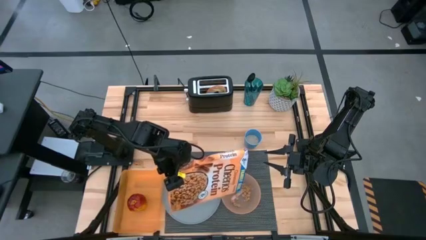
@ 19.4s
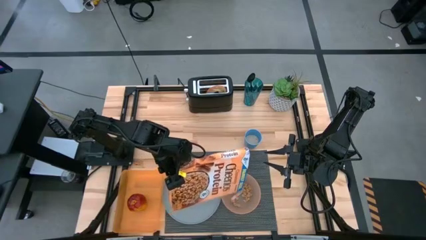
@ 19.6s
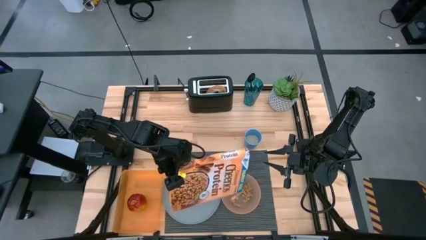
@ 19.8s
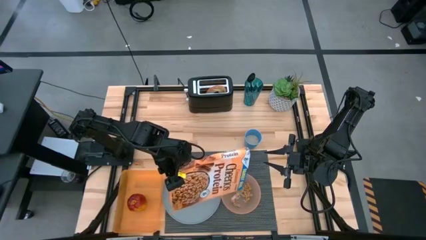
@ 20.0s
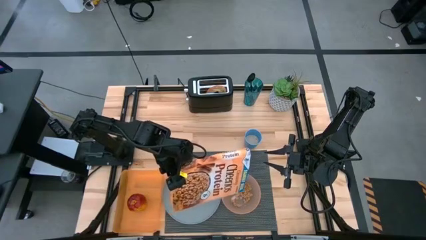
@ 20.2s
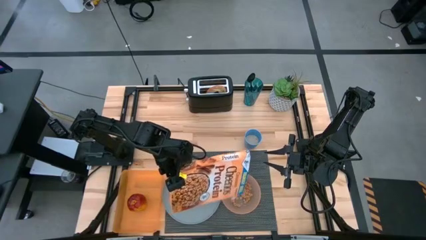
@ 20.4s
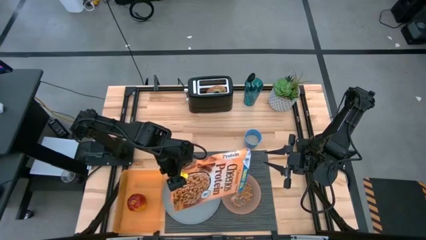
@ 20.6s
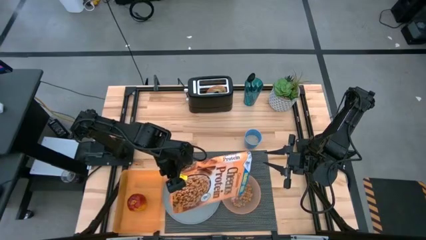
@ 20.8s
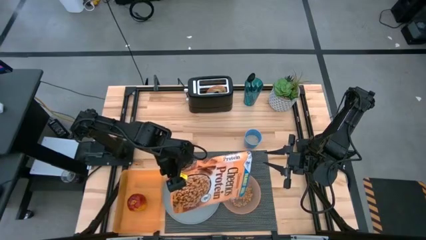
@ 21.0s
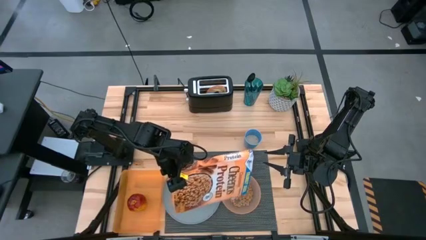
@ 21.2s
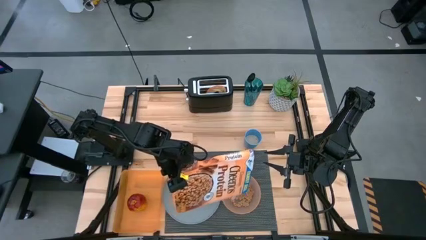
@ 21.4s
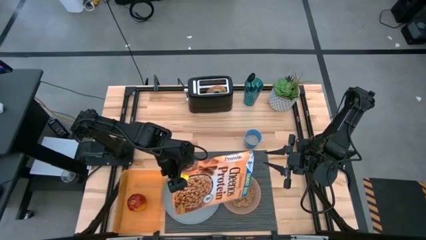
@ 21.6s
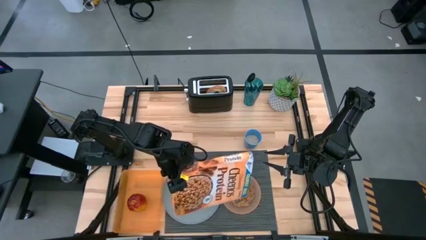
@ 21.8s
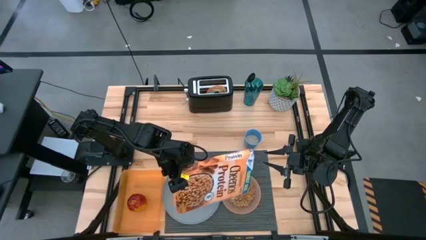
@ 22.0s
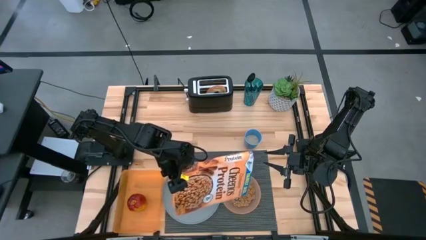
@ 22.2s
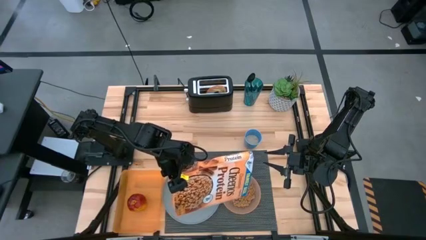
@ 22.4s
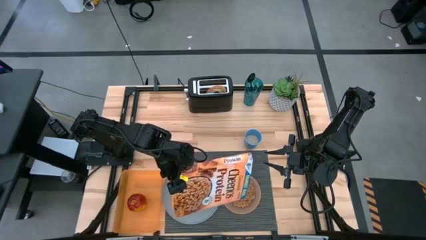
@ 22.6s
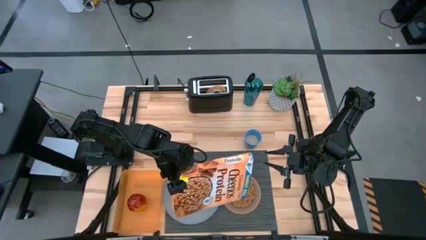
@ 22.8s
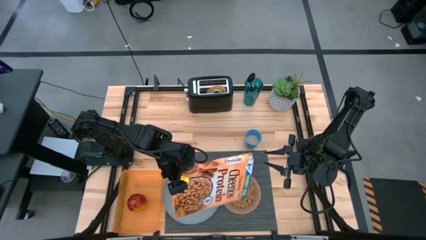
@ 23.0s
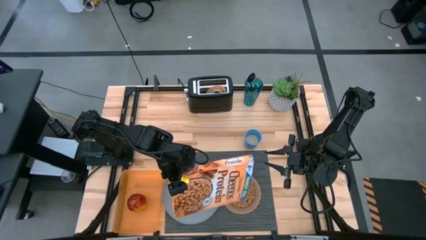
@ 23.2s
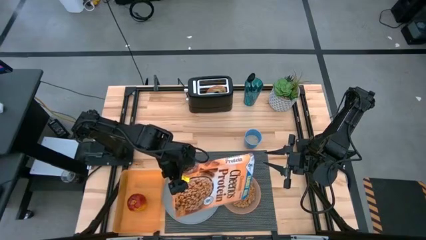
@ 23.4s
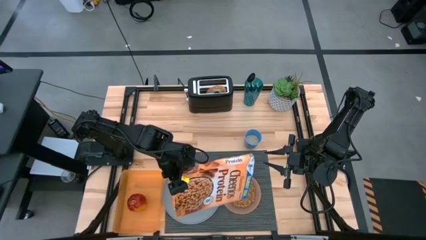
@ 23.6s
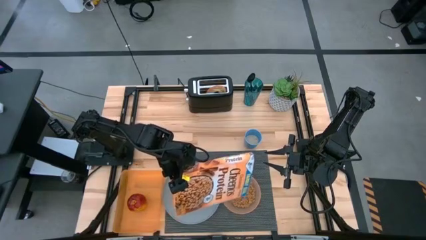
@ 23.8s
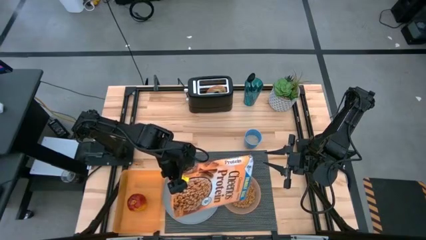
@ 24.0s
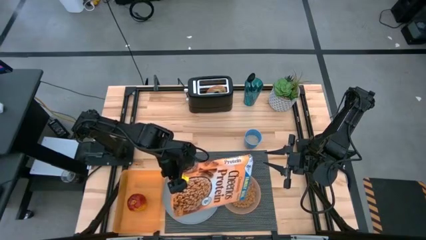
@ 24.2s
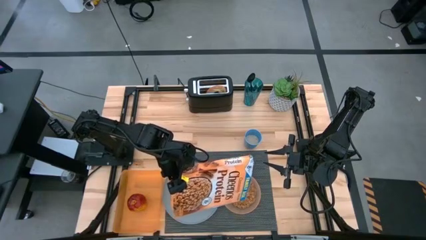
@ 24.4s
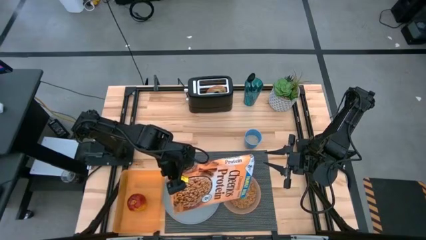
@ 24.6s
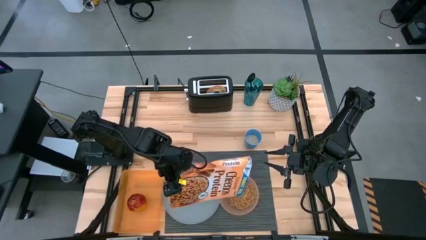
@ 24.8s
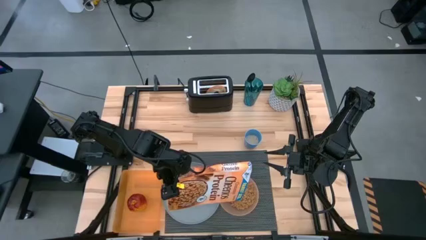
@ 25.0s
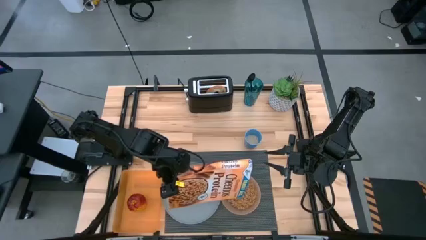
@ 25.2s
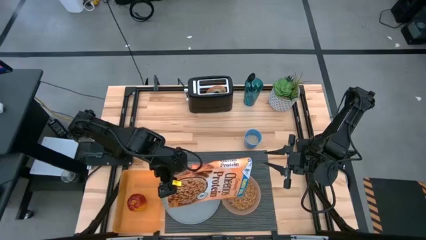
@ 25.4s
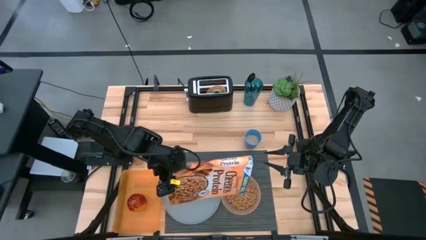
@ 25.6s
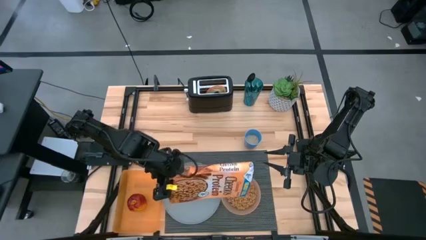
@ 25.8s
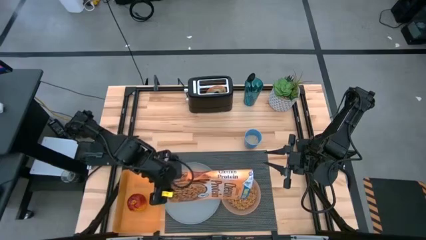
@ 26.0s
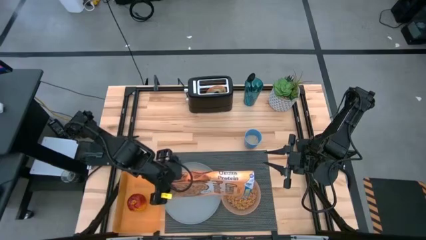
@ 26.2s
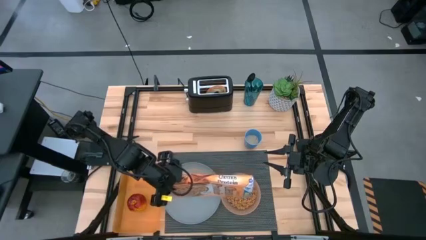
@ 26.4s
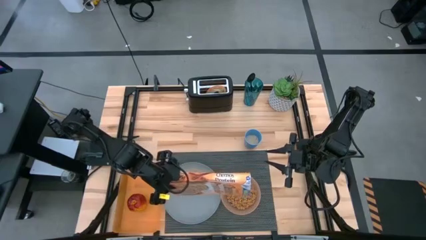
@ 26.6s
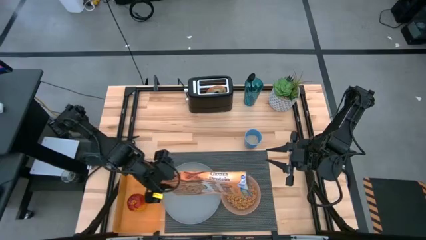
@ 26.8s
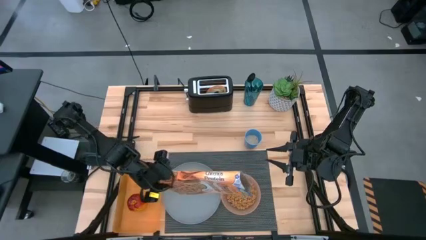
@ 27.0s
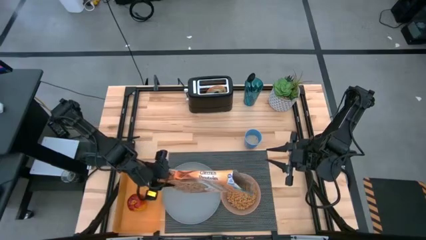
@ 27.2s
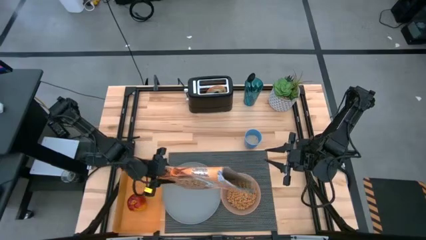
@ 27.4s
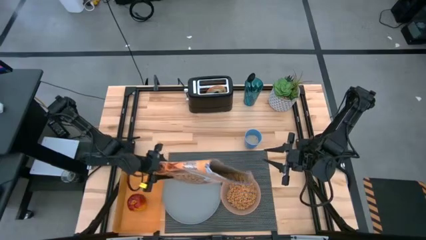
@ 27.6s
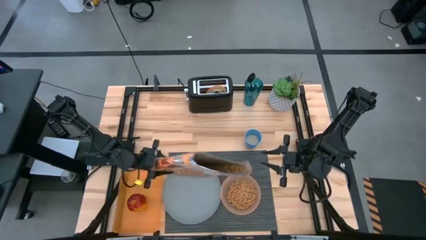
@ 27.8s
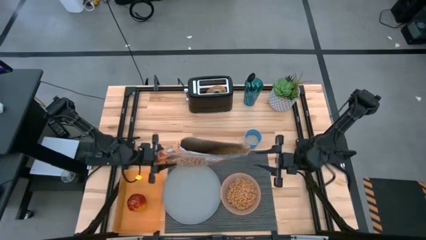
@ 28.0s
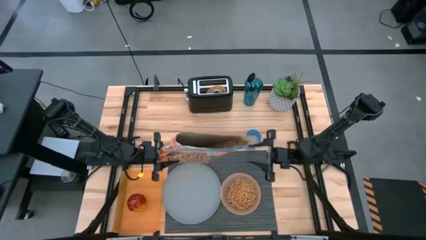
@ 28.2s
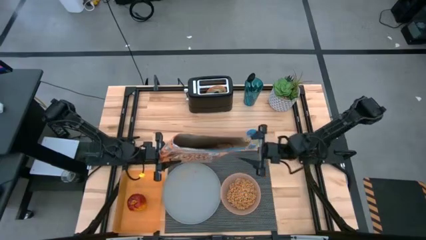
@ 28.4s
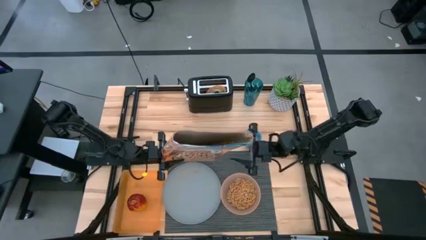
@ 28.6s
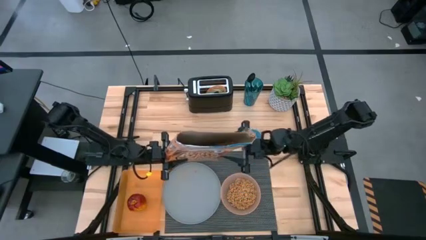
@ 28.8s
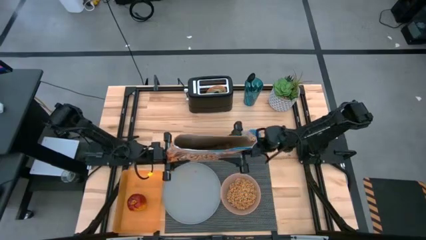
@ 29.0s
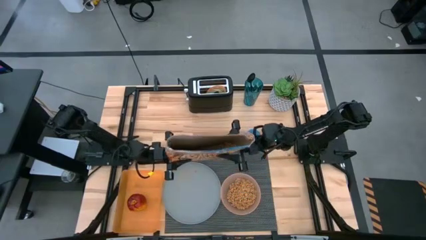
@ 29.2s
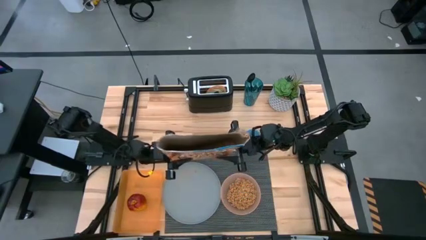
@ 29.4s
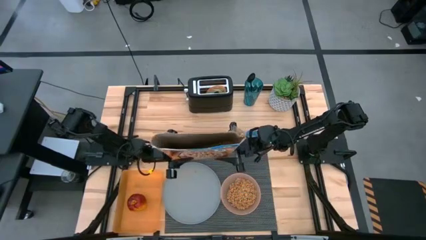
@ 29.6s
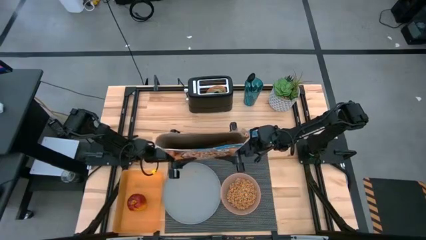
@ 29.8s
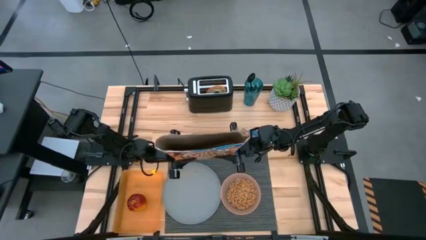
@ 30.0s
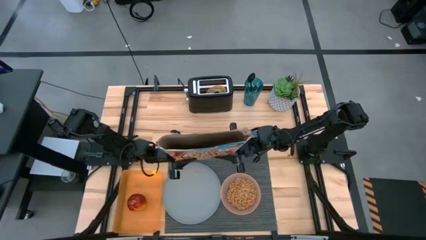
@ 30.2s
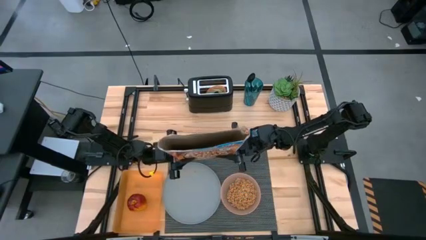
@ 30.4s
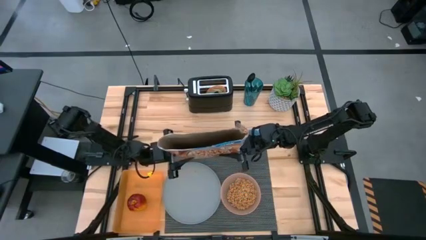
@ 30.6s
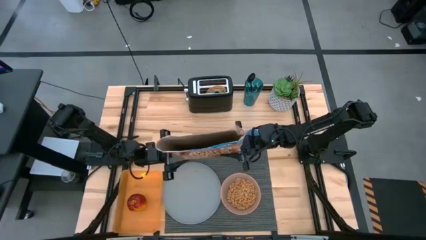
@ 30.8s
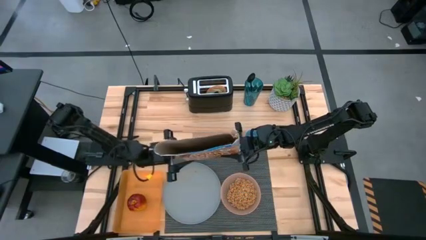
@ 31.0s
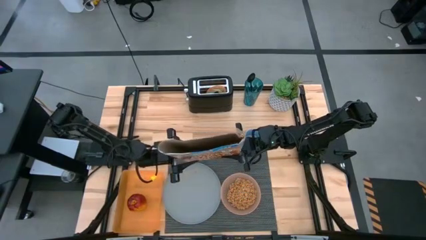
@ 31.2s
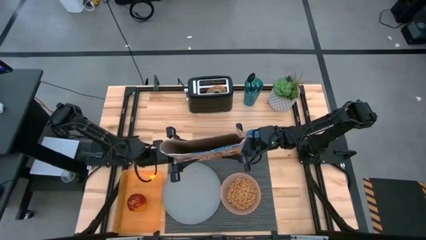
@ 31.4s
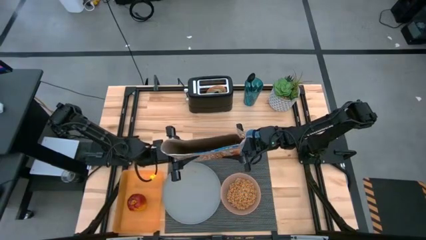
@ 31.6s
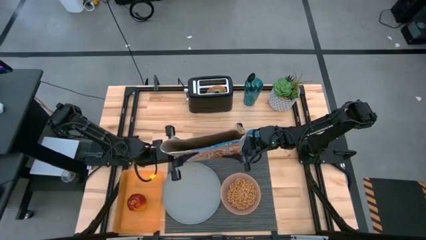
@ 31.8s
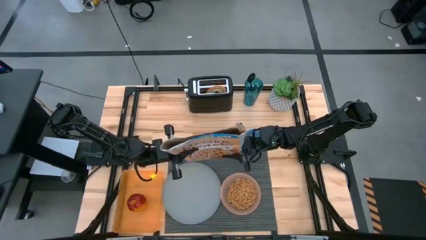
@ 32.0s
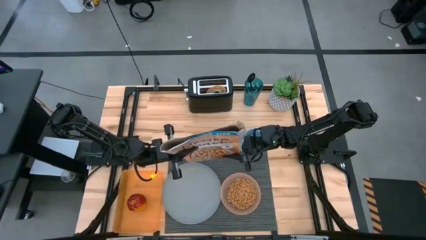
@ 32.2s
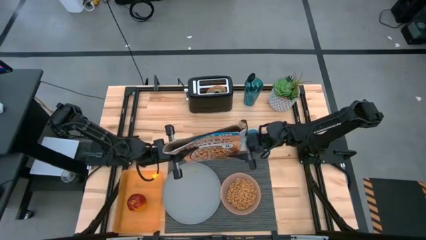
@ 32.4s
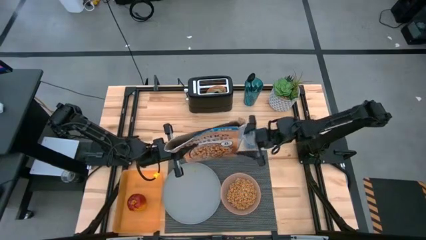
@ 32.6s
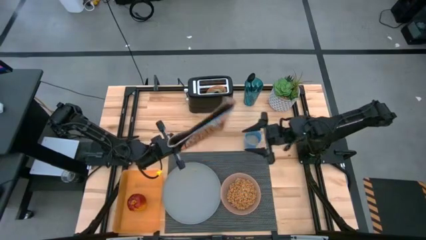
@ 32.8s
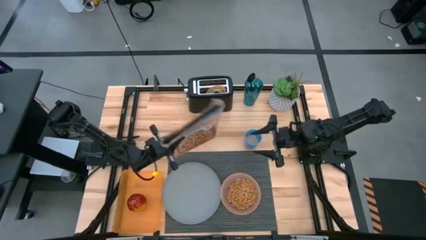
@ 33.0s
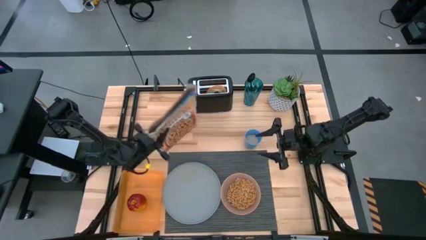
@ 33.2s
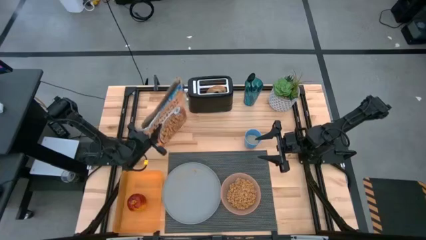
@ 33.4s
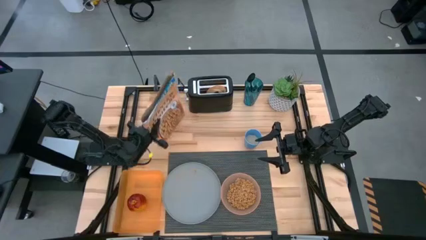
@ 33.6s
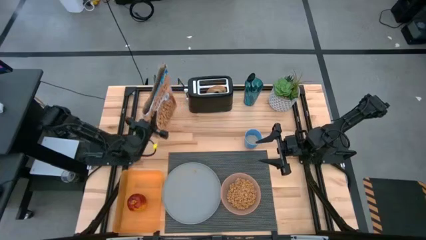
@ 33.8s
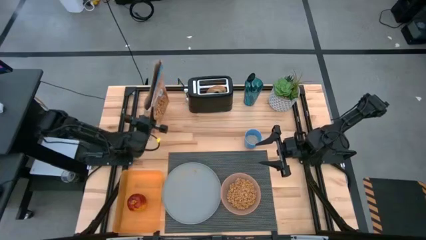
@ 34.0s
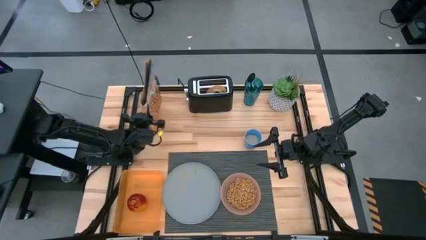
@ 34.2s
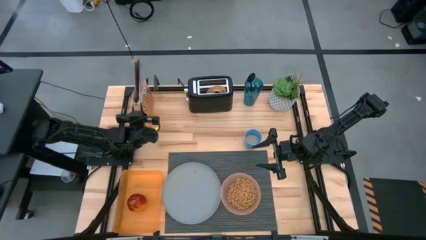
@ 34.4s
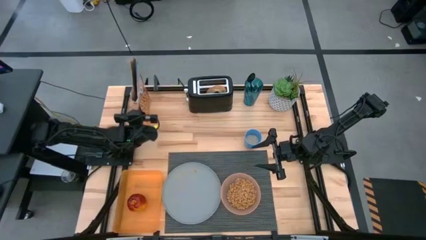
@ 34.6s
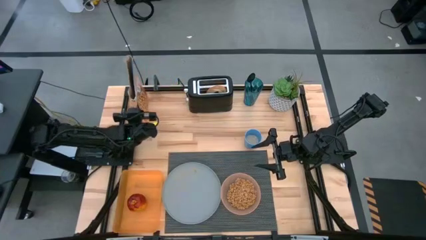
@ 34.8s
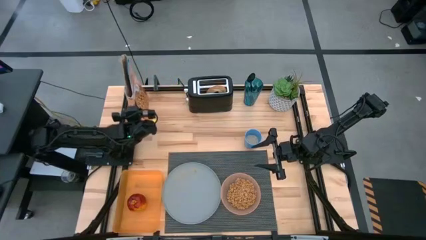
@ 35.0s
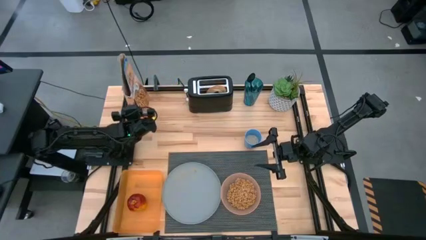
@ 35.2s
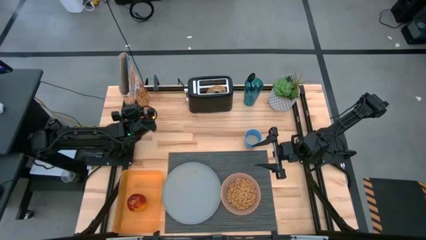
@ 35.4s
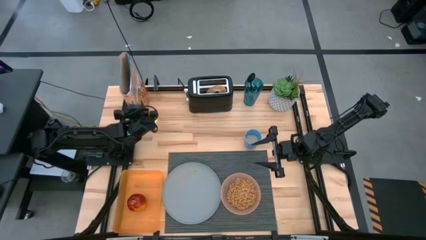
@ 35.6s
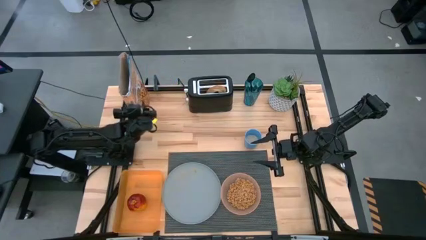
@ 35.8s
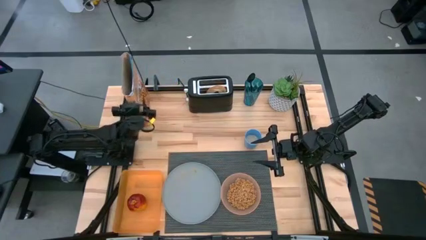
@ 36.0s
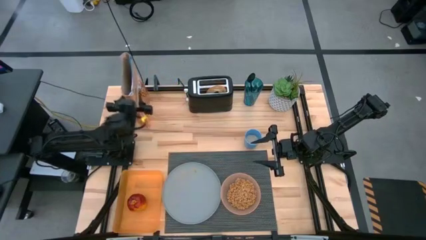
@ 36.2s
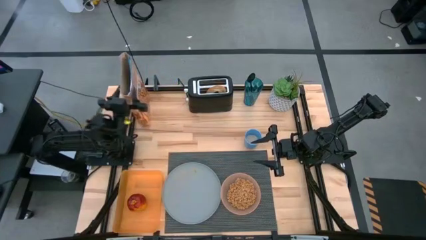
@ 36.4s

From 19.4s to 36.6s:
Task: Arrange a breakfast setting
Pour the cereal from the cereal box into the pink bowl
